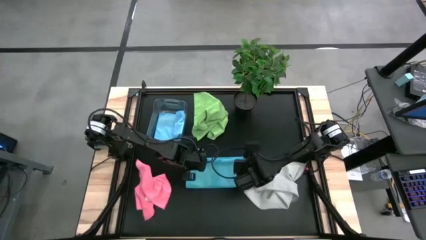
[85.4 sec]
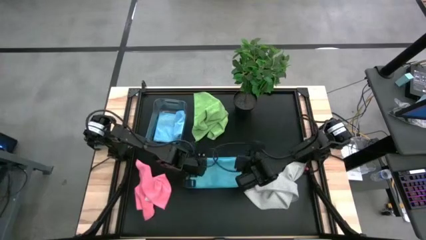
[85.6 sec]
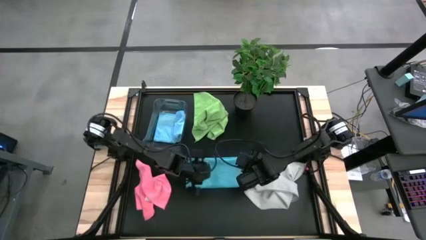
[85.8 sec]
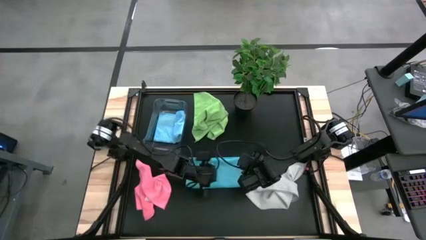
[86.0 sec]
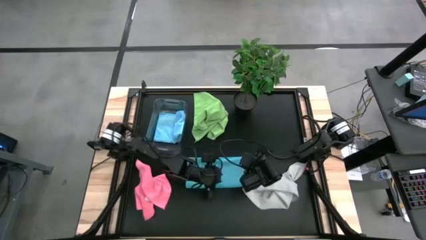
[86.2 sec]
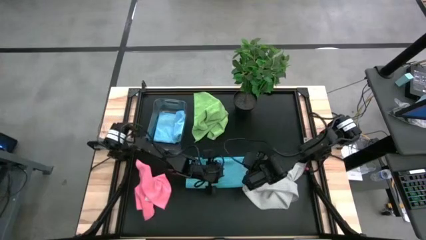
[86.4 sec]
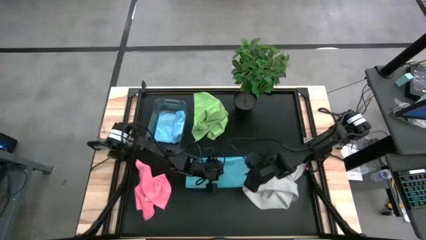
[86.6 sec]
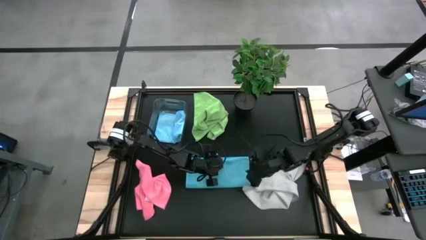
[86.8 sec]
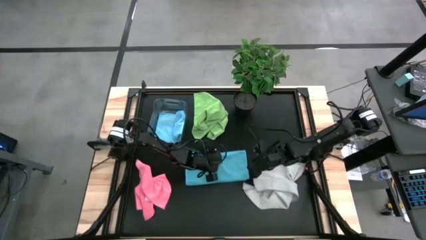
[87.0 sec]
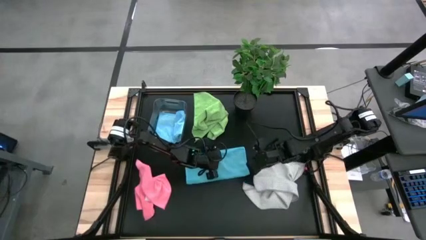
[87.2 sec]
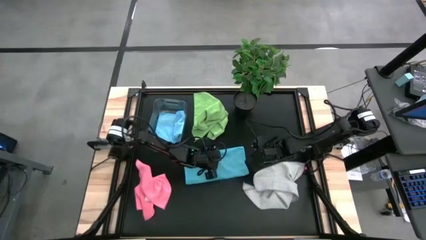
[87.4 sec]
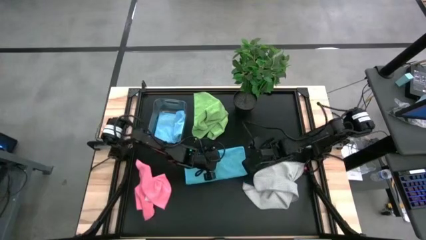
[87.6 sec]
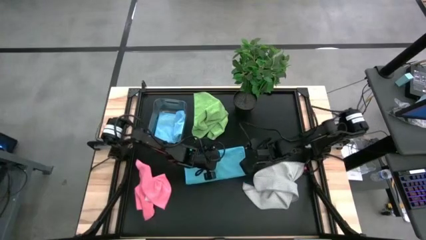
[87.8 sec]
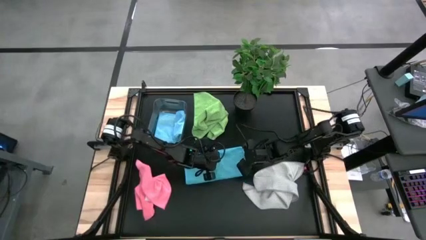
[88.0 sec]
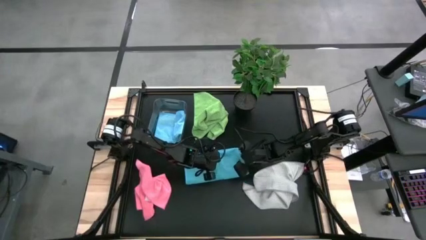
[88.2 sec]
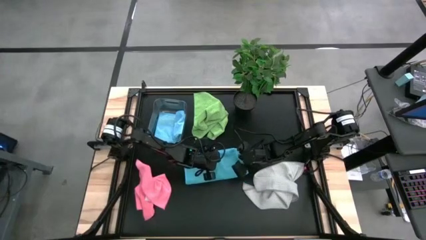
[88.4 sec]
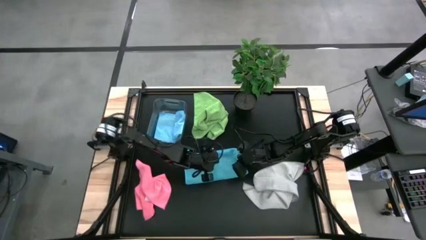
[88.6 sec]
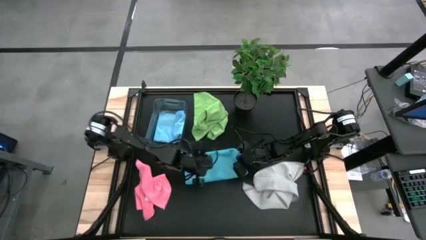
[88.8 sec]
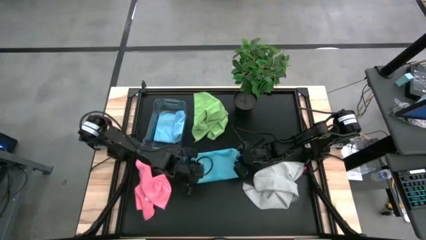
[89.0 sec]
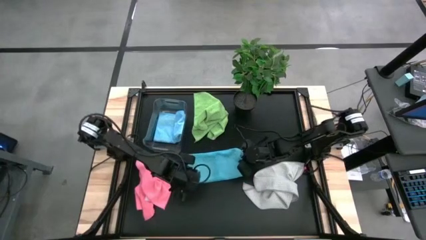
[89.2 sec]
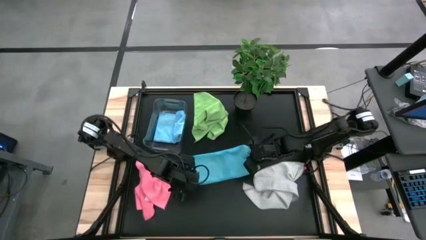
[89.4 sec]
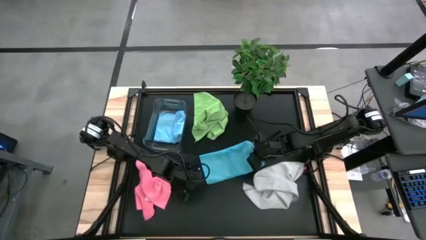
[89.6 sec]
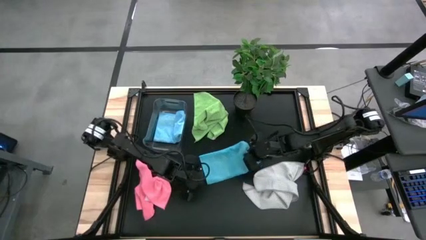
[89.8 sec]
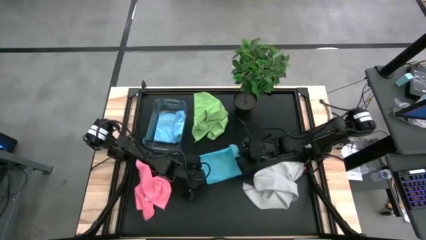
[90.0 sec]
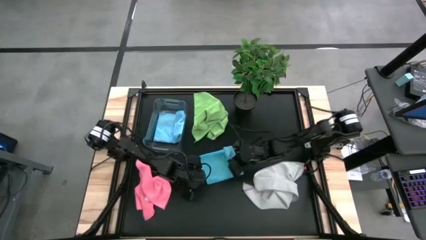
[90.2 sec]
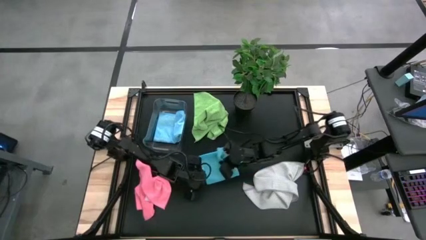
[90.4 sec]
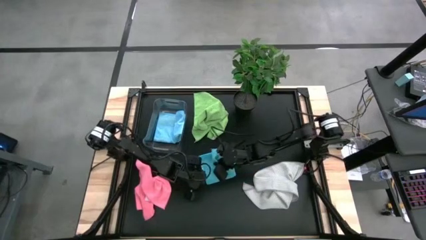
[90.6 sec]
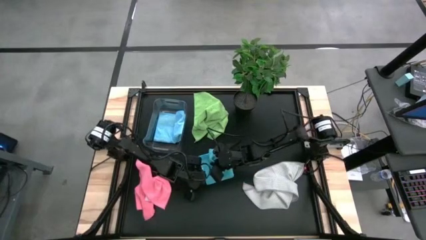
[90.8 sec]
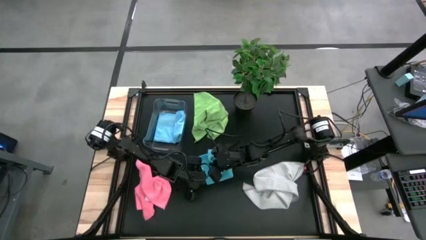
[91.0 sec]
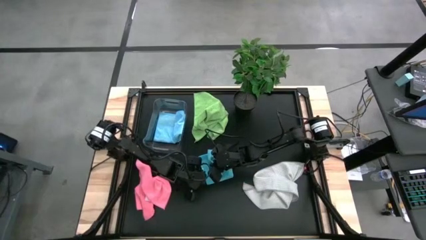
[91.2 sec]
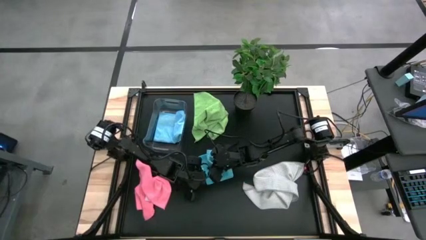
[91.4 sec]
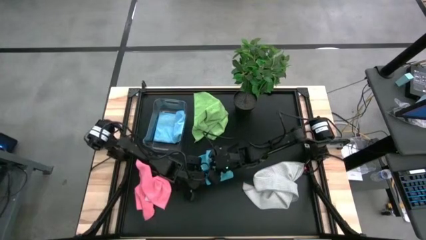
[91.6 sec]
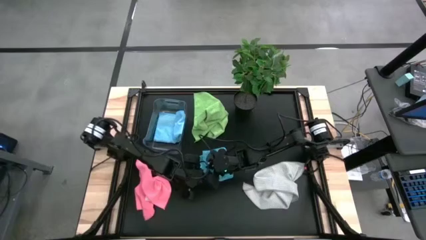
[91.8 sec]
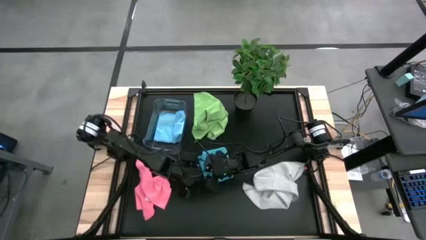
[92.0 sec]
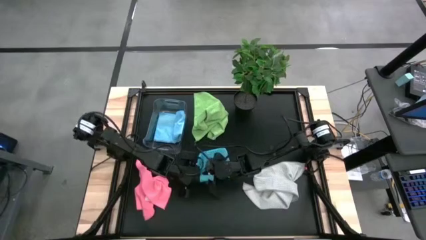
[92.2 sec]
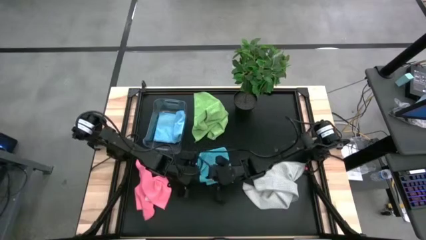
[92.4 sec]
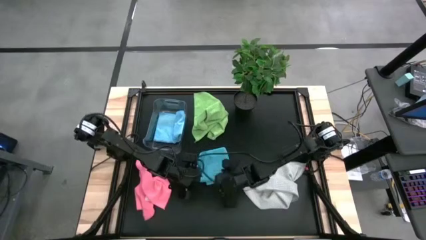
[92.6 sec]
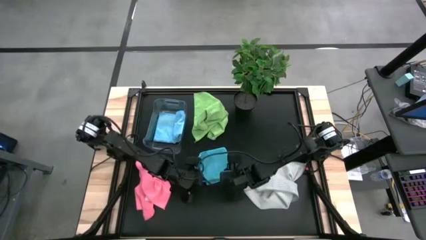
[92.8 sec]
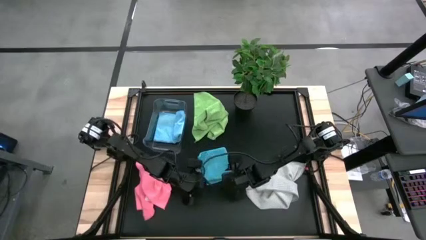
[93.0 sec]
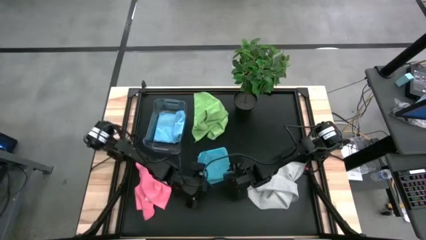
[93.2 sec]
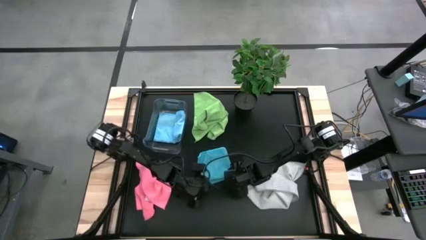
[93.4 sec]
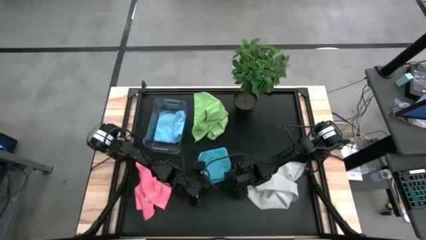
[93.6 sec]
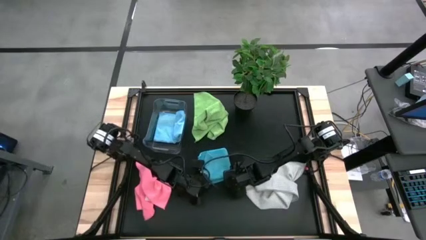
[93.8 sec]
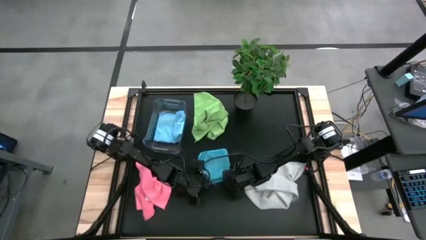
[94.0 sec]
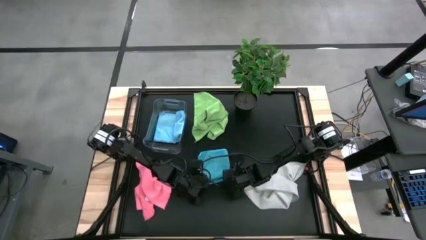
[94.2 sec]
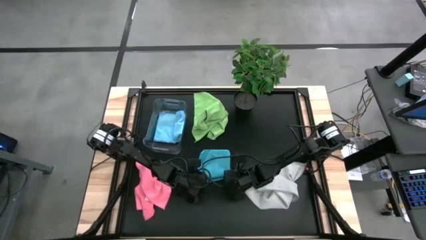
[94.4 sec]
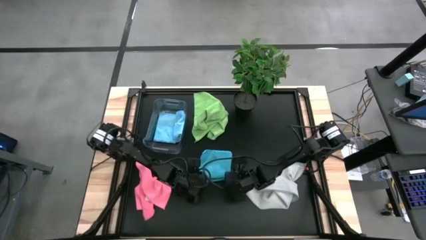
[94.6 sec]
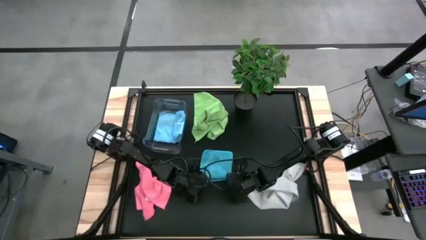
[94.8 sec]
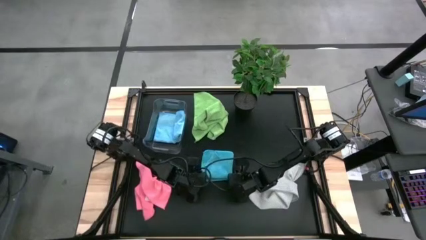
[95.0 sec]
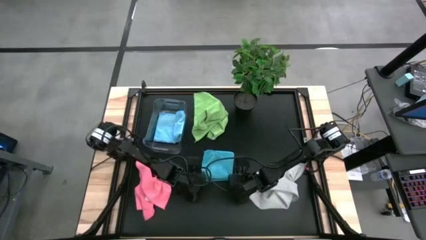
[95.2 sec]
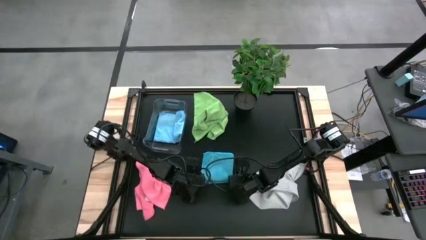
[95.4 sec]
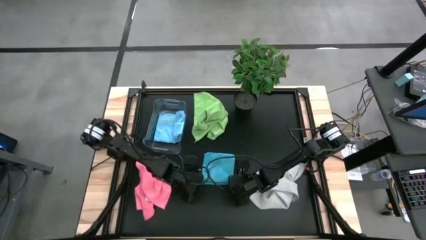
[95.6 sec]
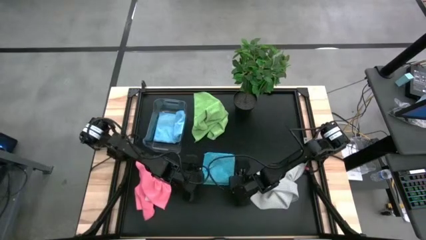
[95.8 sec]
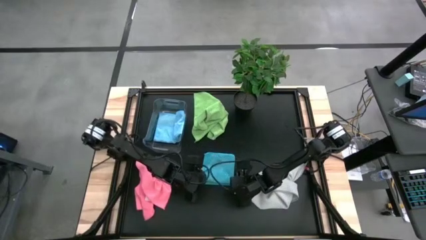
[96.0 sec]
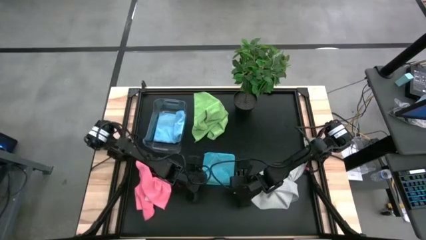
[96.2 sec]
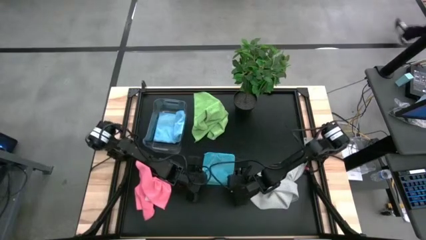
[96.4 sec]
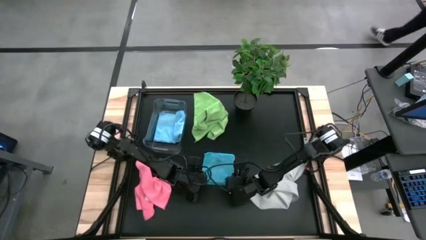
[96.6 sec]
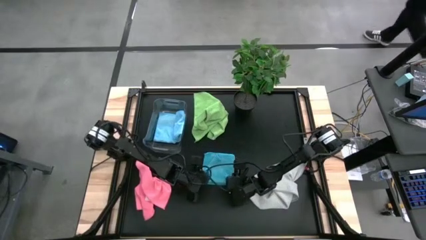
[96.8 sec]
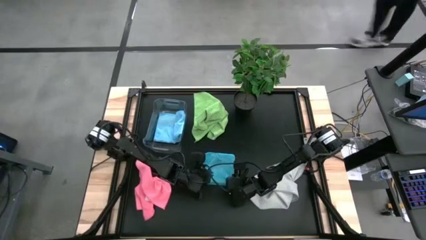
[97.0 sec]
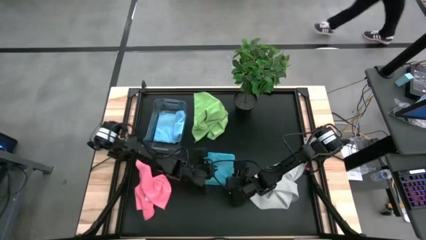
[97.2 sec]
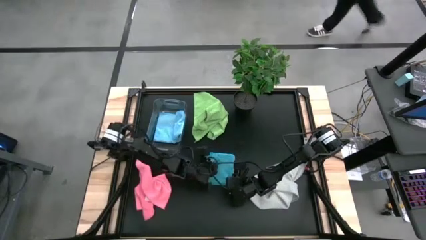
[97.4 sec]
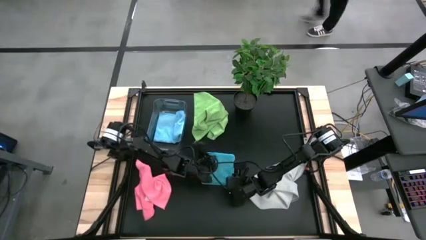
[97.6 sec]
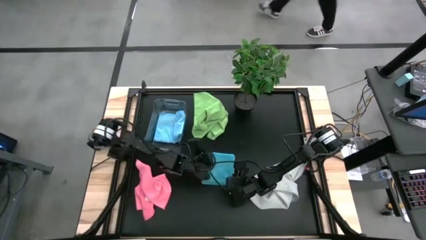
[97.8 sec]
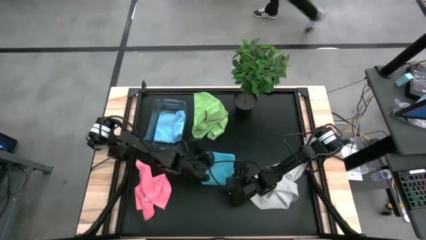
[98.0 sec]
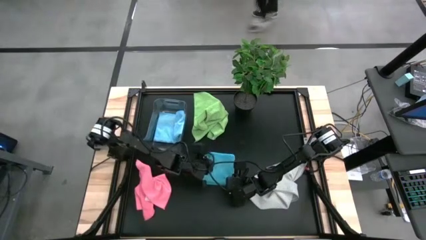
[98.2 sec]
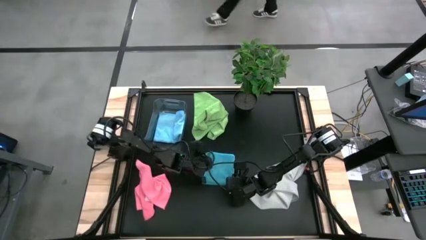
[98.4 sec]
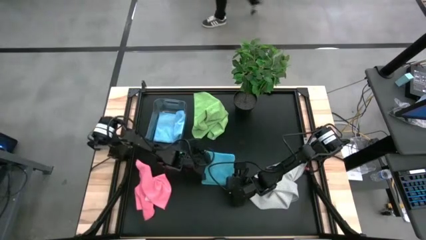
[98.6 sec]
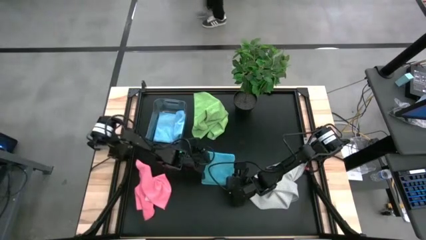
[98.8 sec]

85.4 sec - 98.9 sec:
Task: Fold microfiber towels
Fold the blue microfiber towel

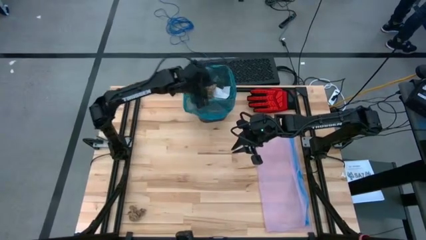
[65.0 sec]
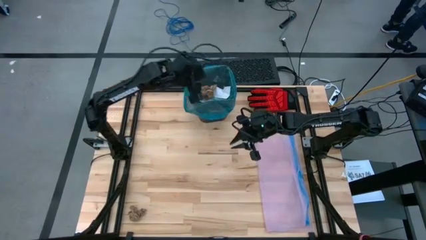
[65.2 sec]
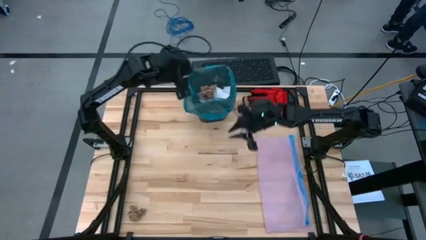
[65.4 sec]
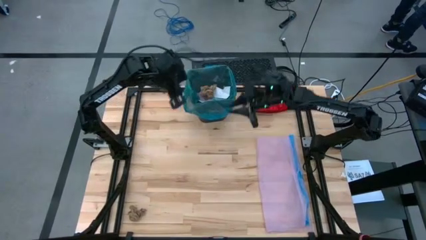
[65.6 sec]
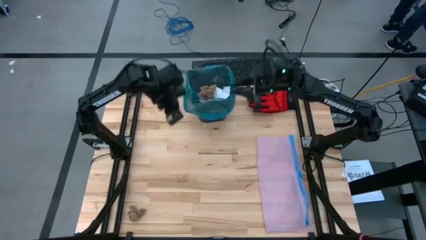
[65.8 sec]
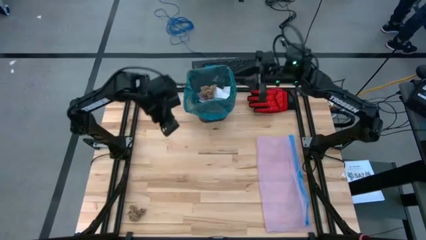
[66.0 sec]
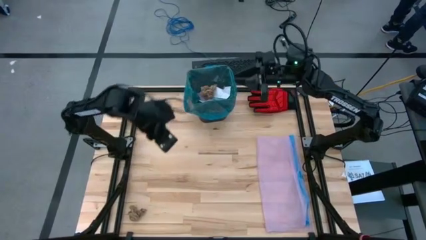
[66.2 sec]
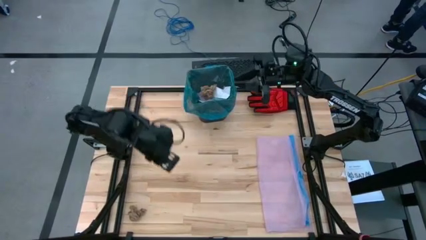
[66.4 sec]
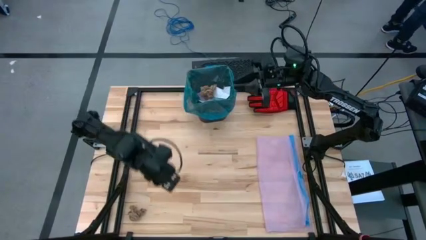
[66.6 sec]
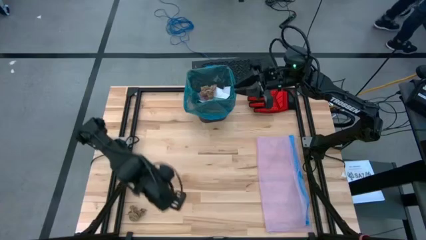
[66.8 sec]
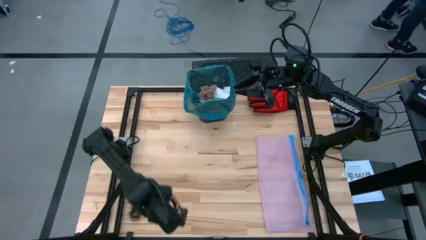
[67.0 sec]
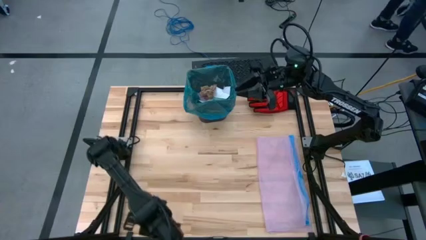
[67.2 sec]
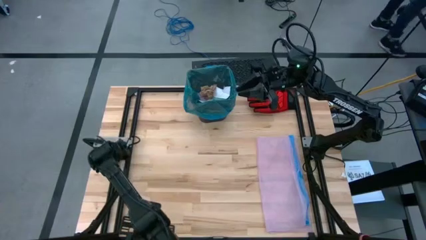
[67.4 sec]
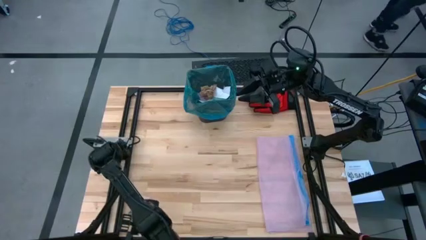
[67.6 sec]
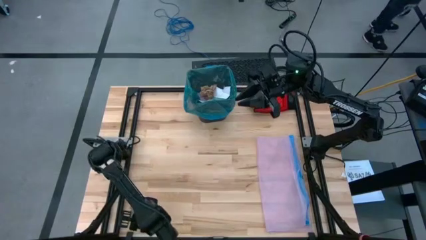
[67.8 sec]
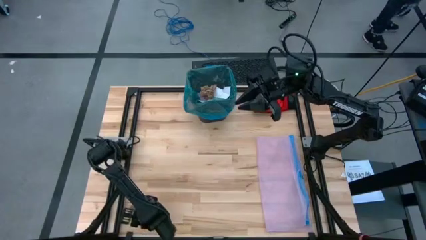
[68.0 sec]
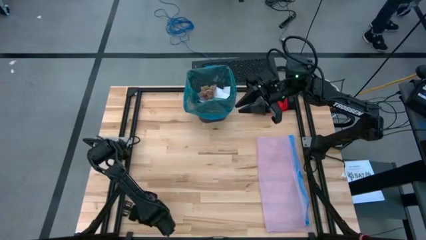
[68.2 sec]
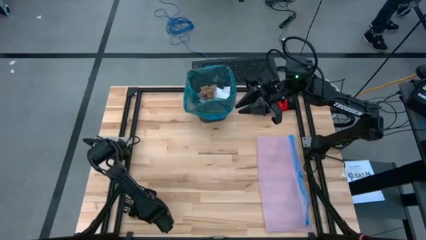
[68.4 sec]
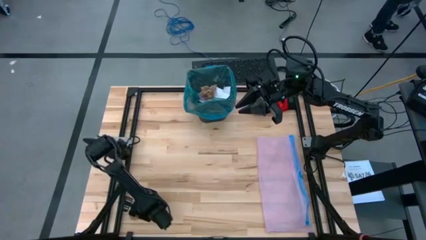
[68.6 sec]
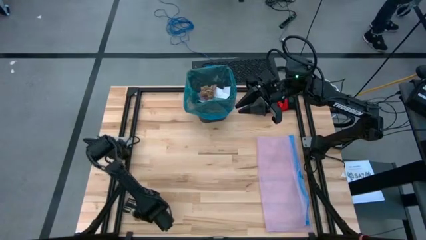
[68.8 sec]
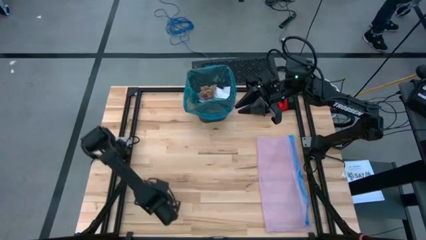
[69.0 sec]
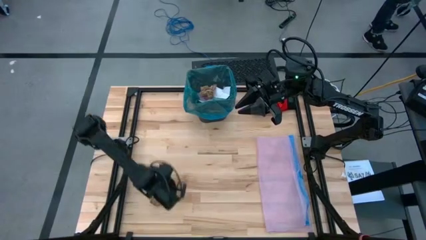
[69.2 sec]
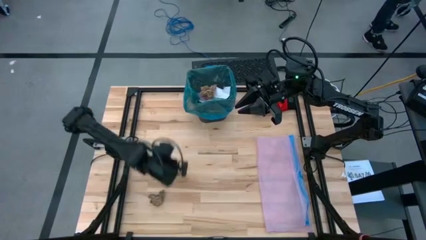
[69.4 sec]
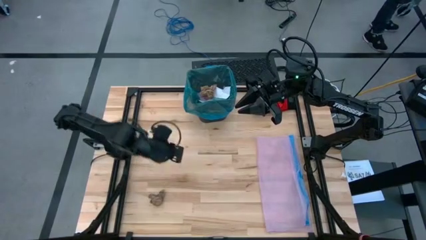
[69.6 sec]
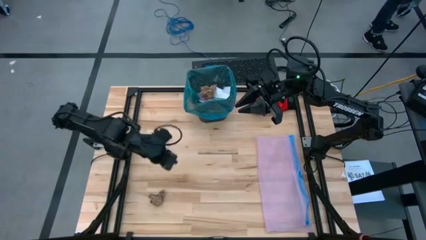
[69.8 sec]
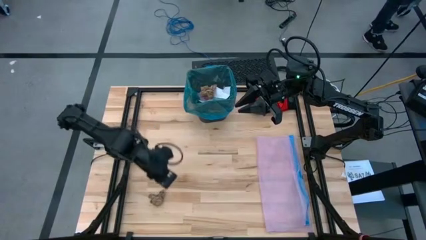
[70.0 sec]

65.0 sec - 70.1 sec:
Task: place trash/remove bag and relplace
Put the brown napkin into the trash bin
